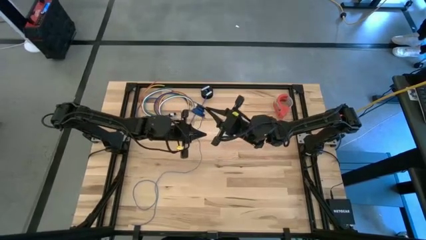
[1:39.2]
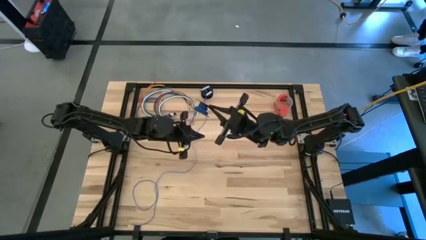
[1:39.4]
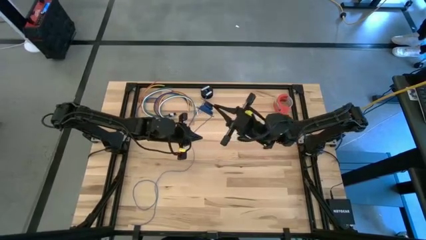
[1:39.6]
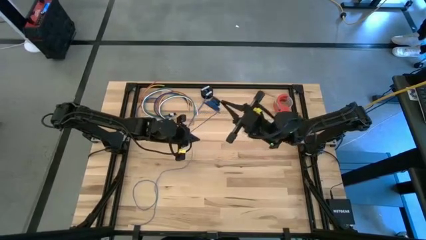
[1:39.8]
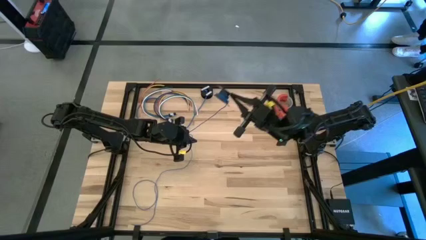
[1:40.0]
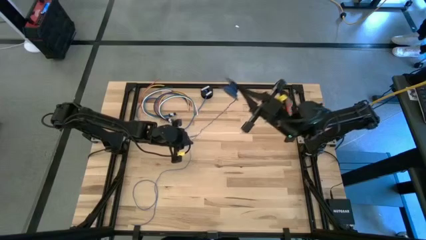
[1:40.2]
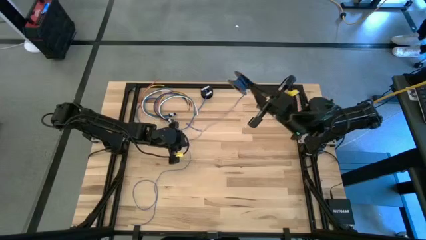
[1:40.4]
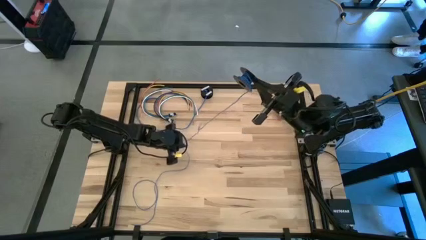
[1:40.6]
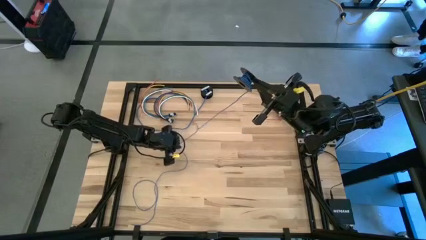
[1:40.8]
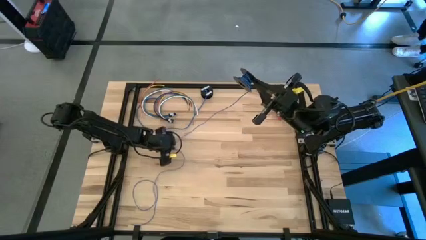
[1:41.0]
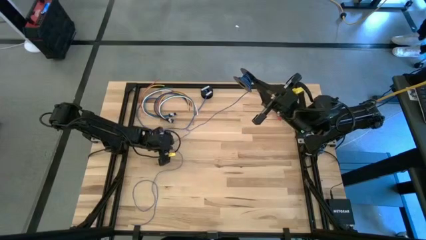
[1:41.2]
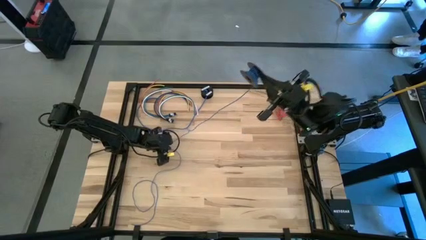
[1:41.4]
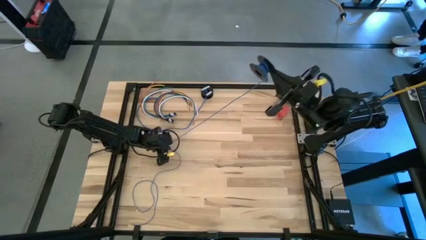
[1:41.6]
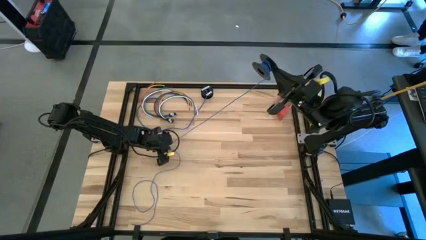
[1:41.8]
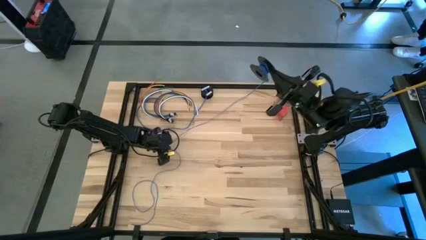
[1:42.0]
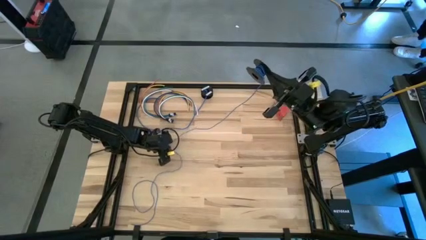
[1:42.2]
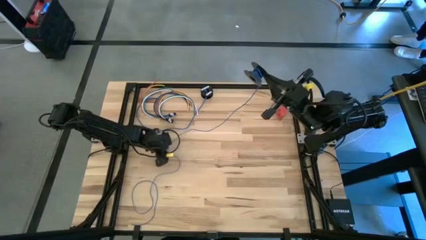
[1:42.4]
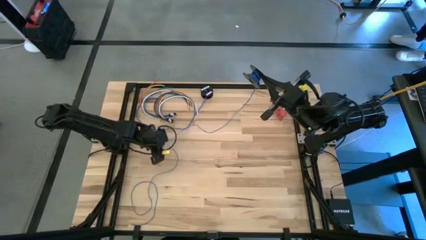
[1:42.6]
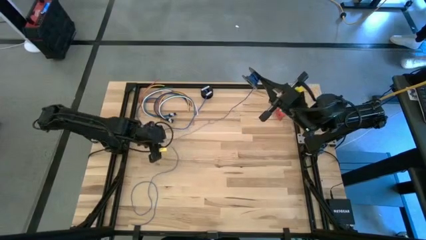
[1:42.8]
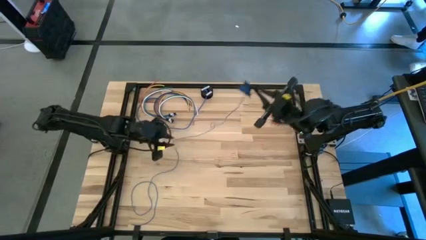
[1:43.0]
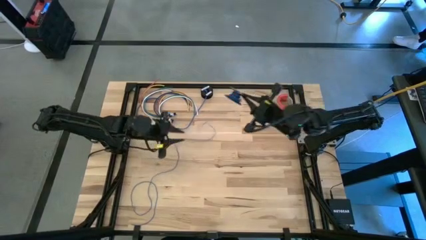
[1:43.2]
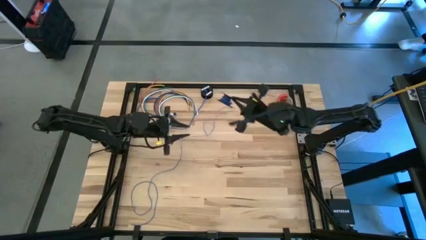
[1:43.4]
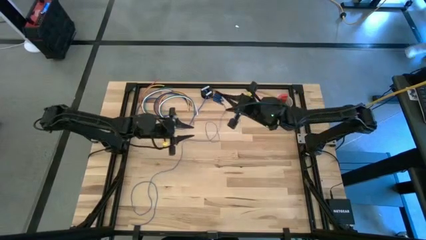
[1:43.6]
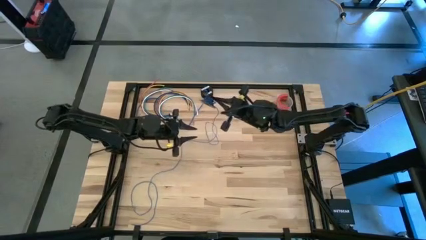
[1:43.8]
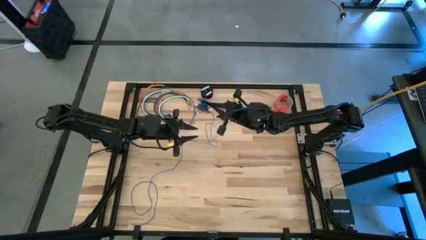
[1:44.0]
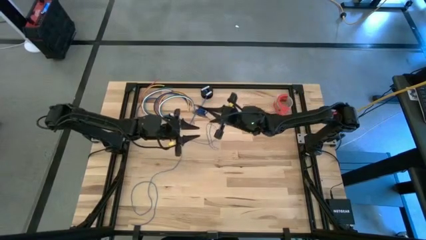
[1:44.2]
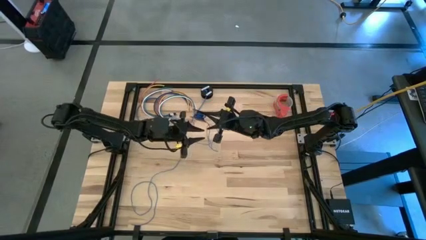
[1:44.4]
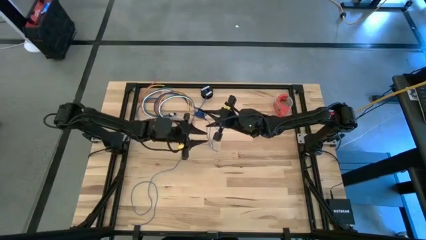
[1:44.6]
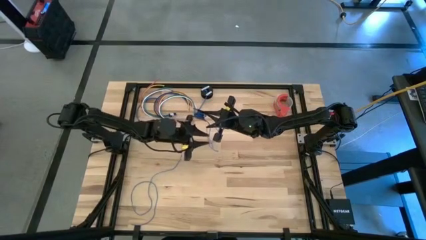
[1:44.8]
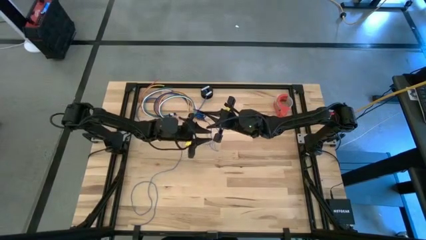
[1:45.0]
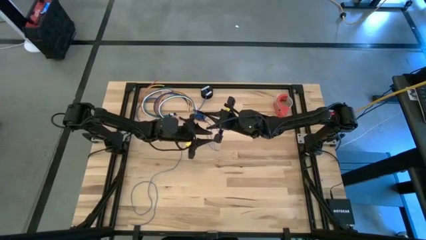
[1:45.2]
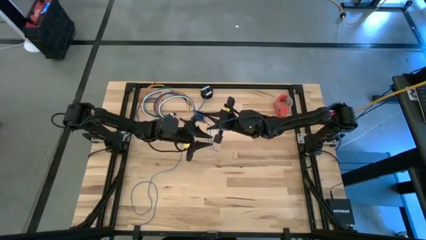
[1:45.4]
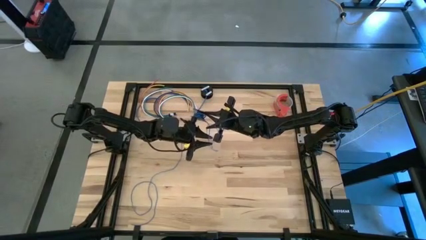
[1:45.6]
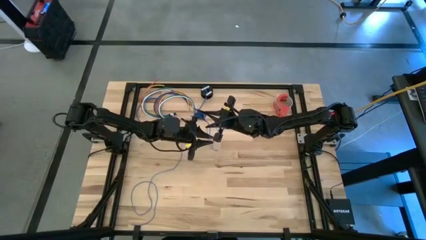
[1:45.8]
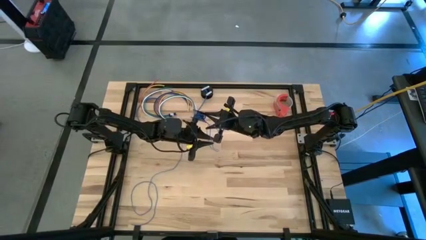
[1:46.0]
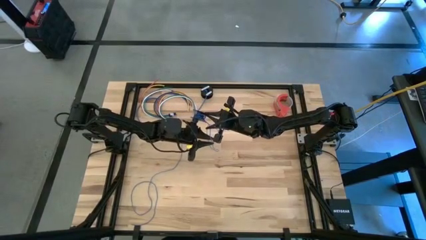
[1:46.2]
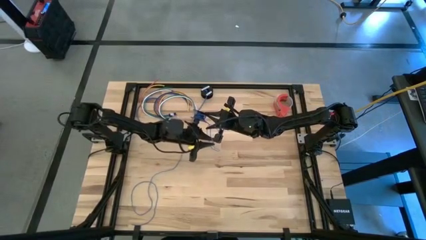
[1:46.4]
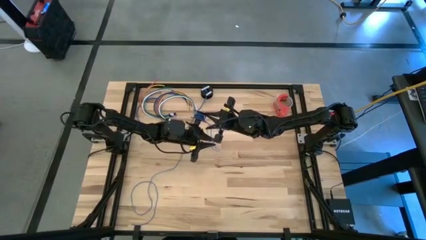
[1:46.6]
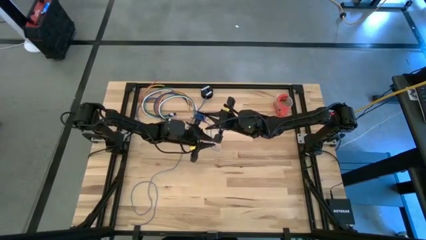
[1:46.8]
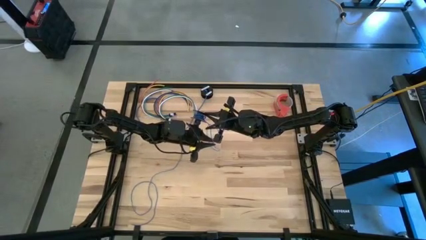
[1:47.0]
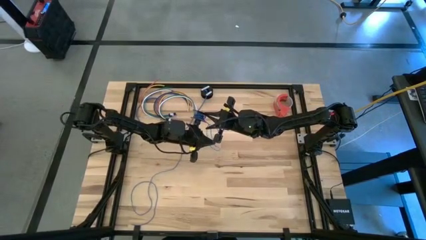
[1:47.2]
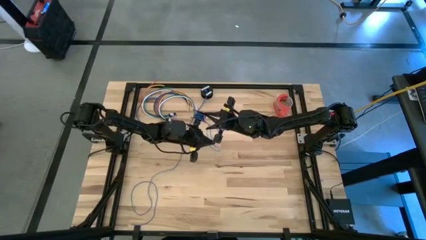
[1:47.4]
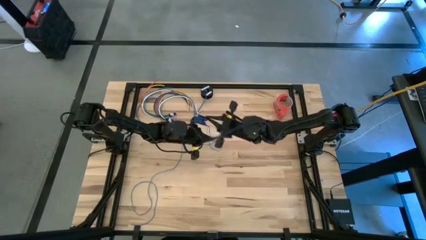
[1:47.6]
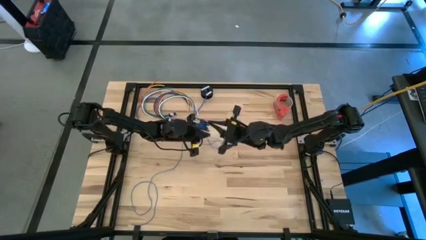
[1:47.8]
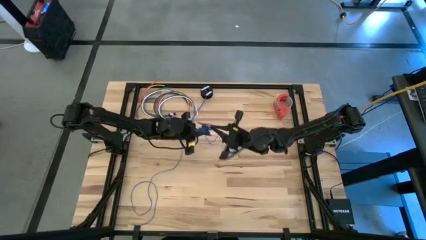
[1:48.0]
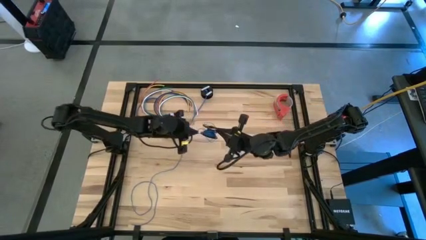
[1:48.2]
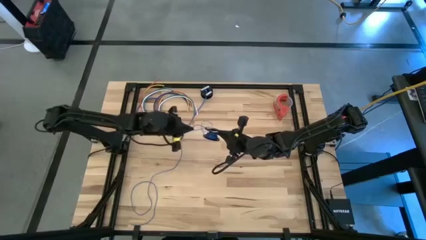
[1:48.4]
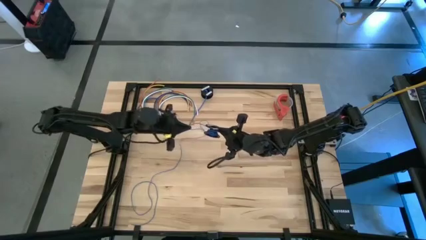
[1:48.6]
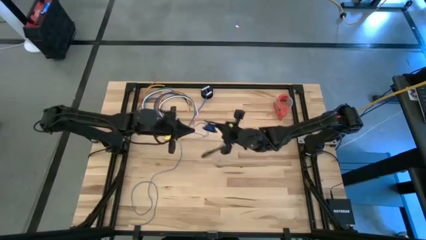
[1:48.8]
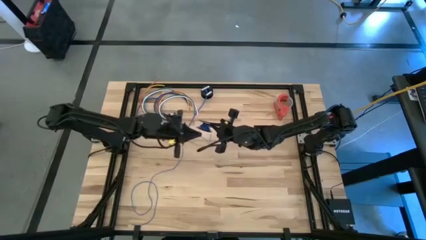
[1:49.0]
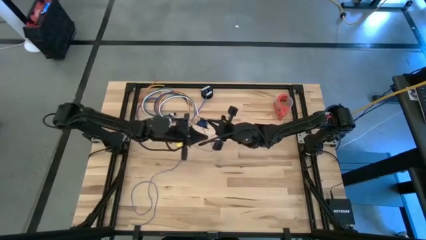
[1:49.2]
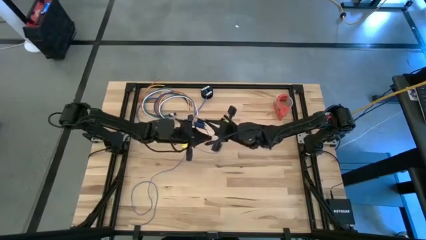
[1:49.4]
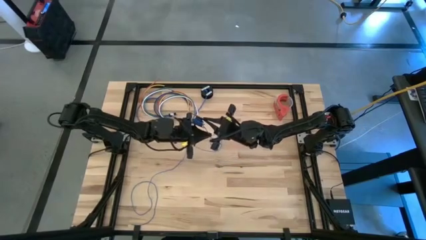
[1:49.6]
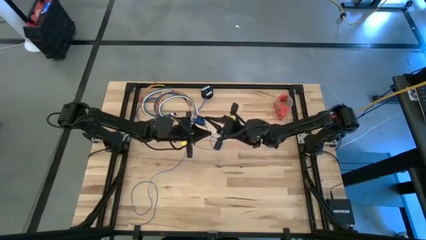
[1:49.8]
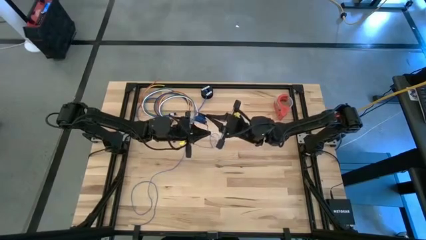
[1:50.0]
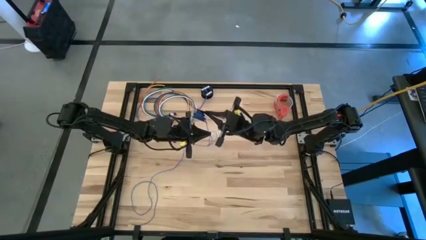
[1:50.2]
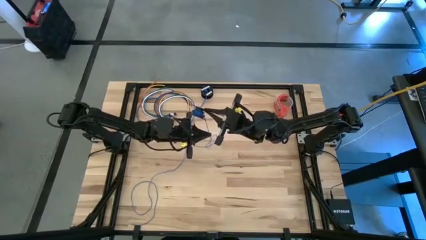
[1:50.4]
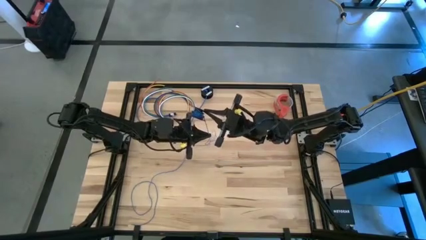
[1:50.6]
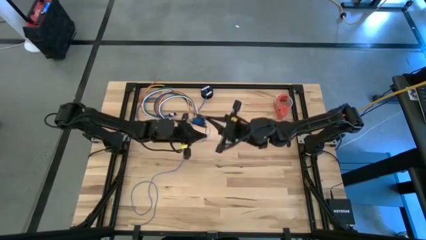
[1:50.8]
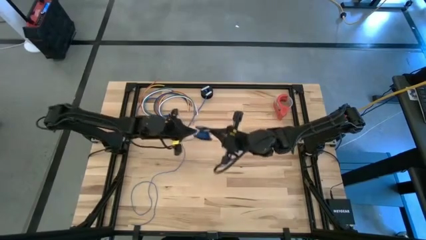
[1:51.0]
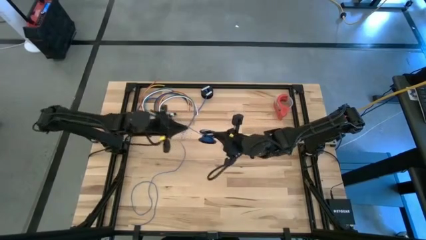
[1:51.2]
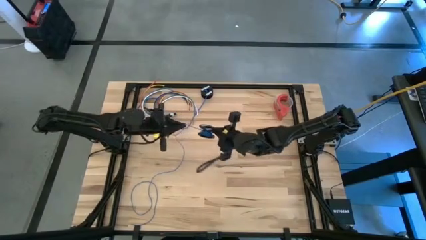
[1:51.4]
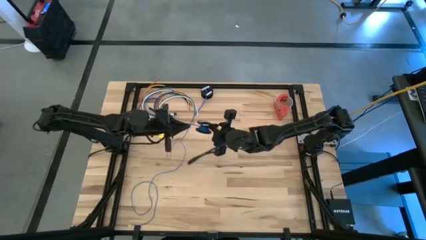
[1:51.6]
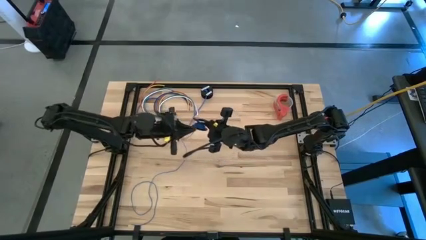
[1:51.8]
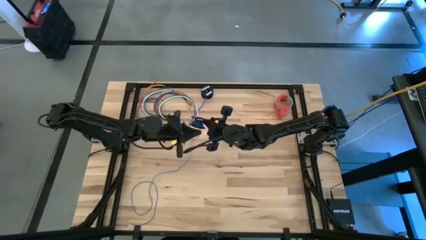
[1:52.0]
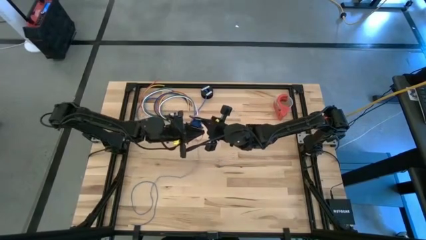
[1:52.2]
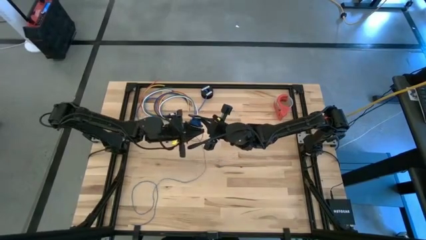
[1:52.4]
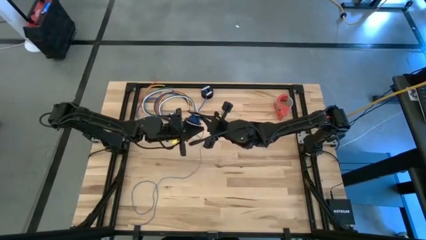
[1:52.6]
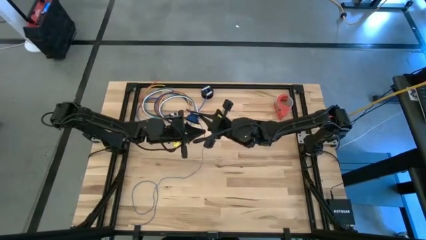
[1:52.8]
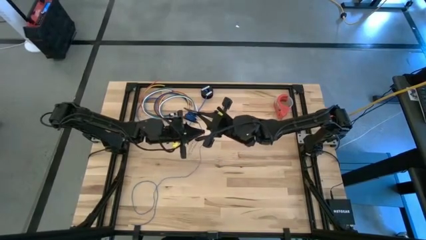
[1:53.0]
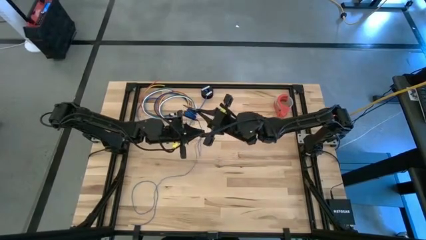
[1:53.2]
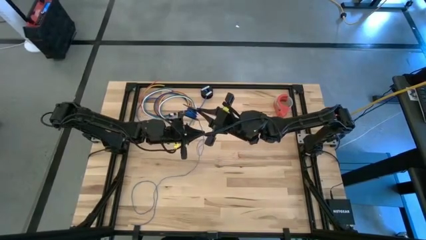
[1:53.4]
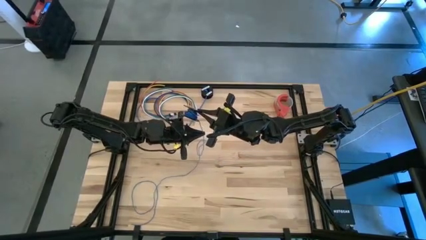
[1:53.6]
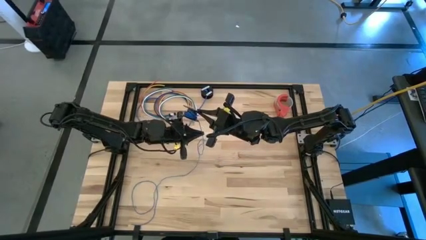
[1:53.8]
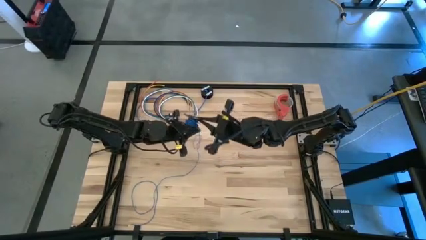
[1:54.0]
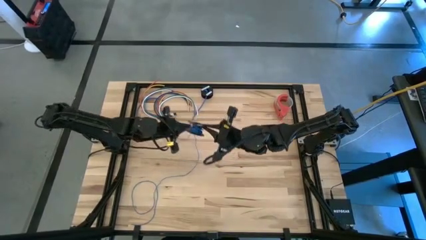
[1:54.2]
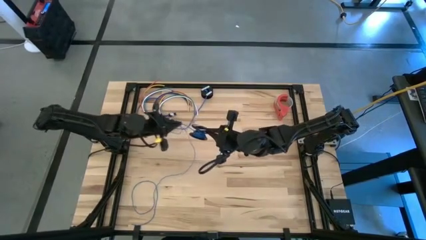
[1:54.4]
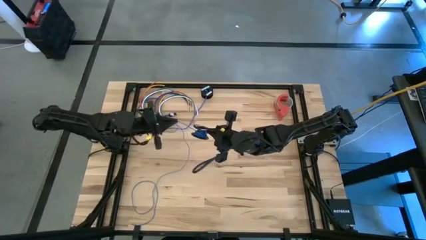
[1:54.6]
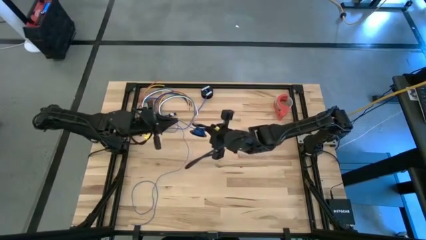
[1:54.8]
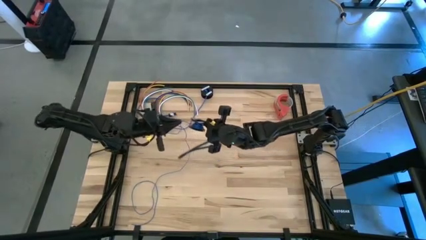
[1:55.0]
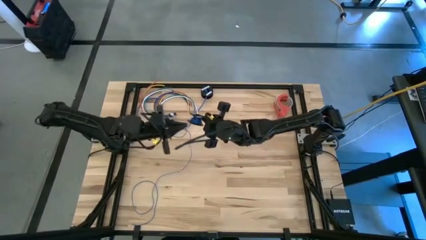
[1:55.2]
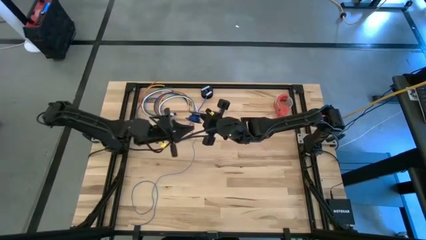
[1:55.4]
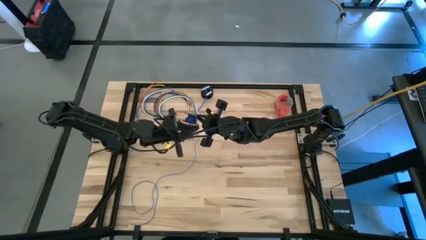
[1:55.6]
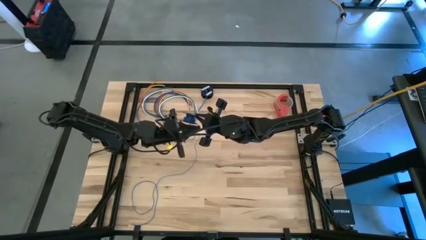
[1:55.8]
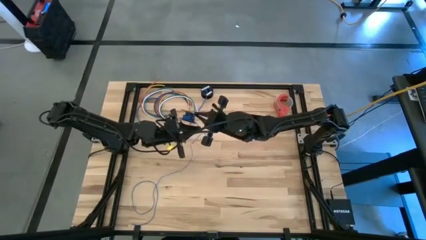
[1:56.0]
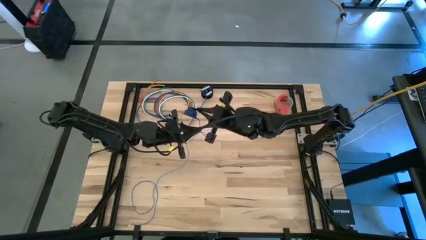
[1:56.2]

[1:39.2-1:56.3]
Task: Coil cords
Coil the blue wire onto the spool
